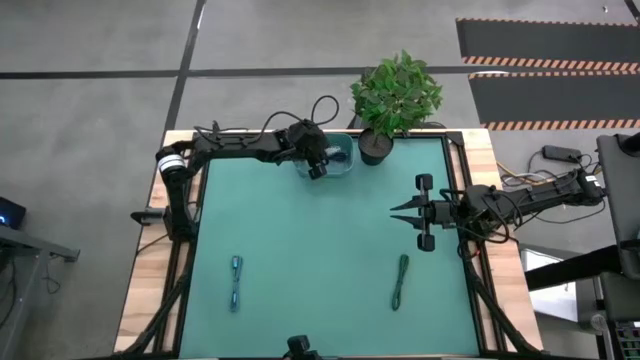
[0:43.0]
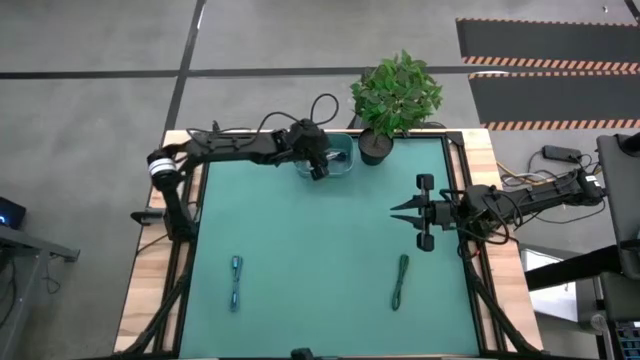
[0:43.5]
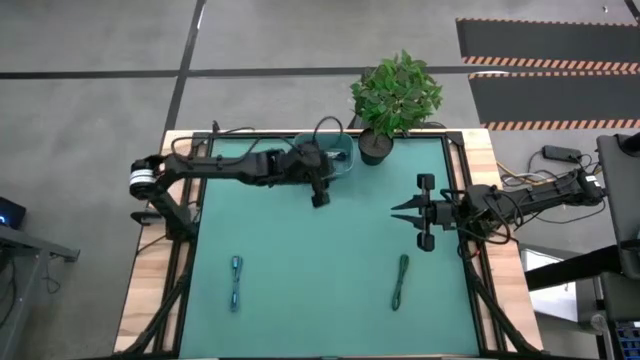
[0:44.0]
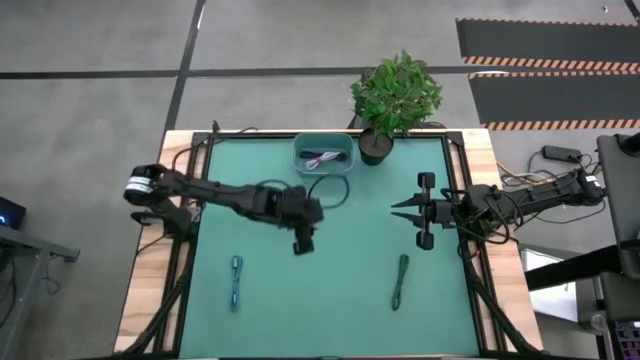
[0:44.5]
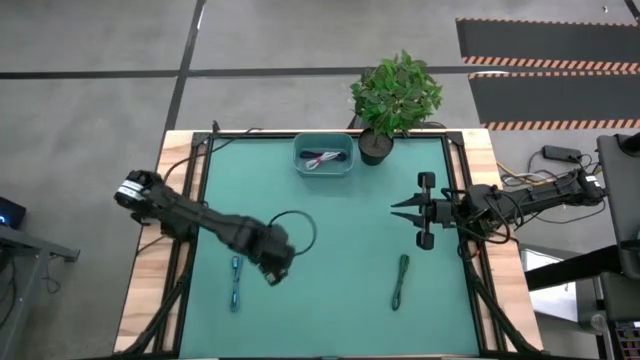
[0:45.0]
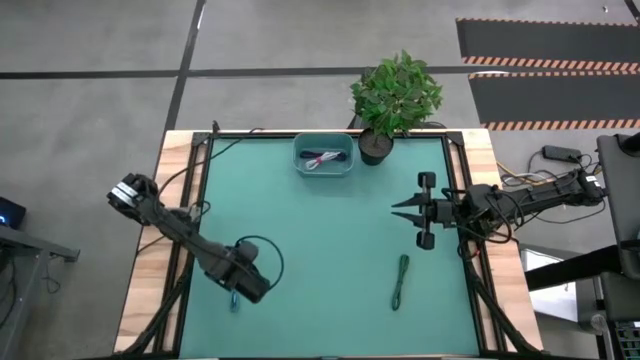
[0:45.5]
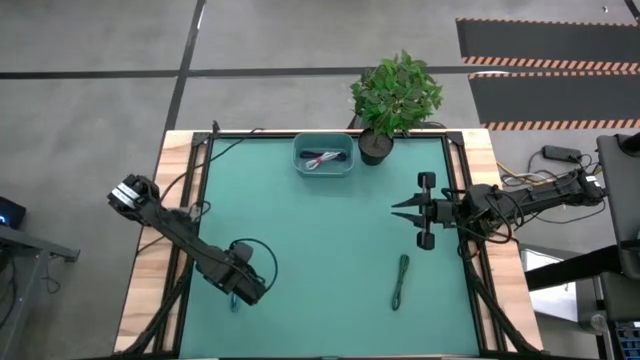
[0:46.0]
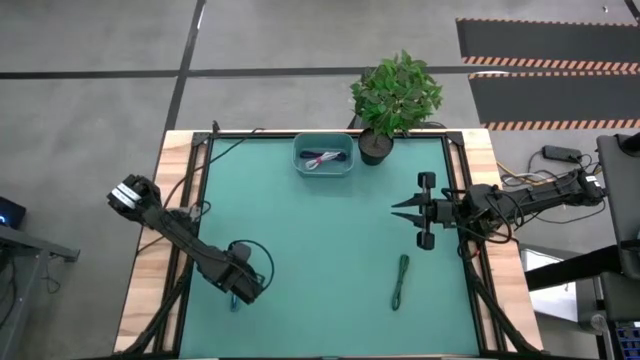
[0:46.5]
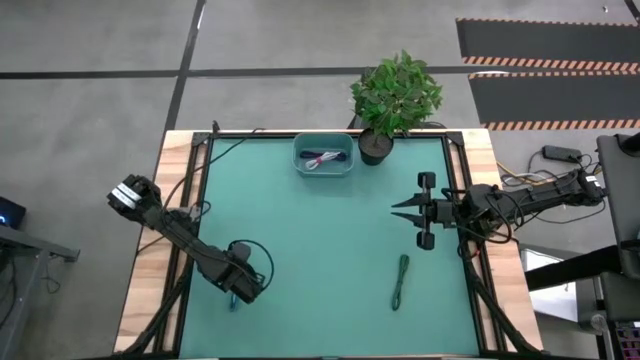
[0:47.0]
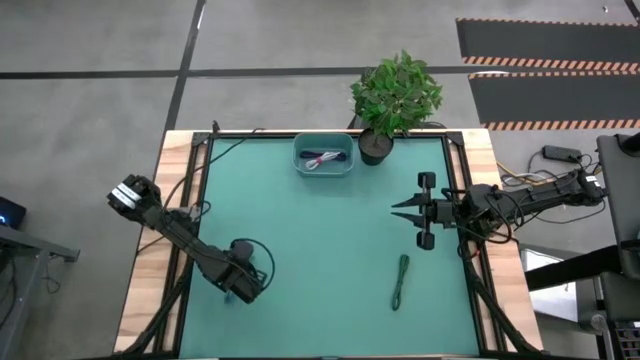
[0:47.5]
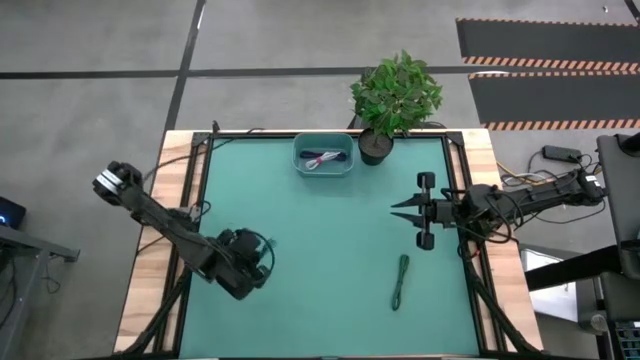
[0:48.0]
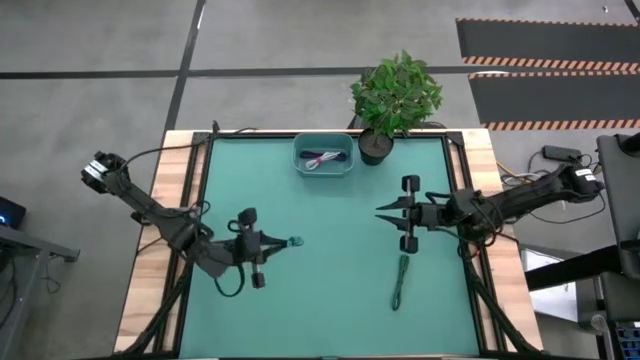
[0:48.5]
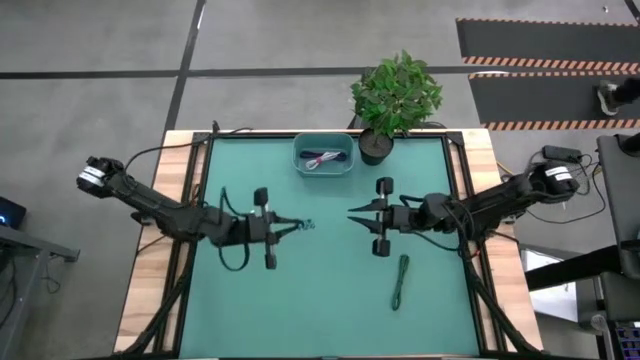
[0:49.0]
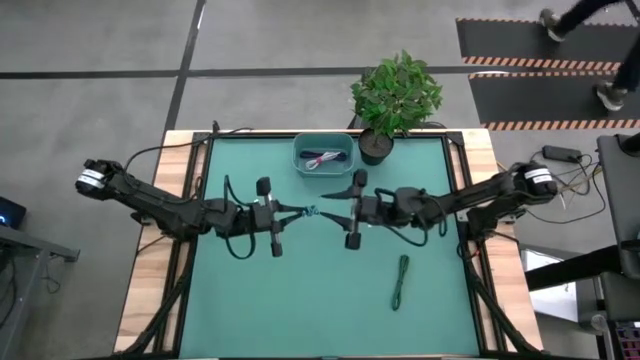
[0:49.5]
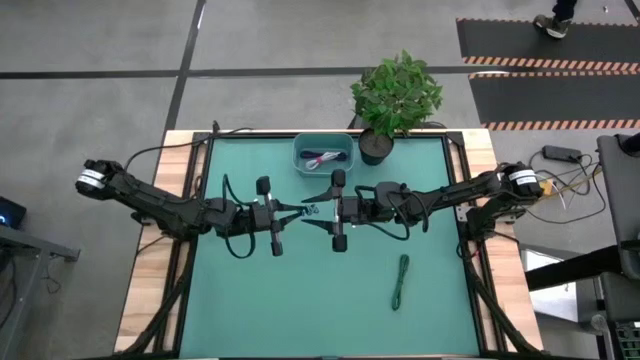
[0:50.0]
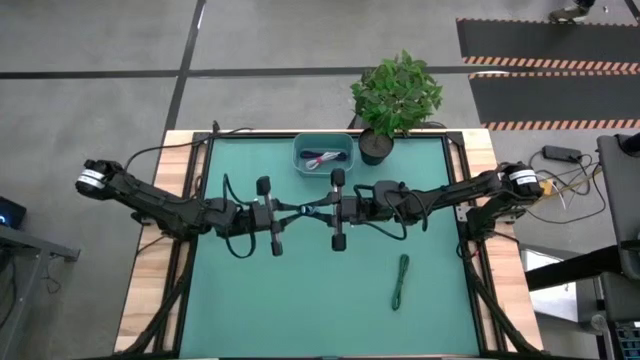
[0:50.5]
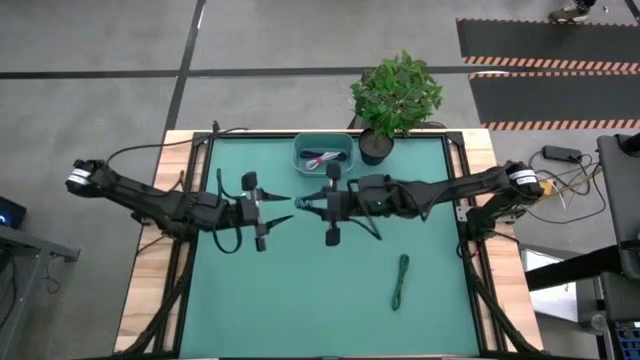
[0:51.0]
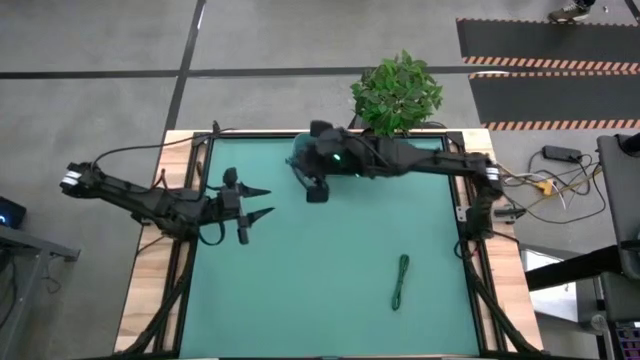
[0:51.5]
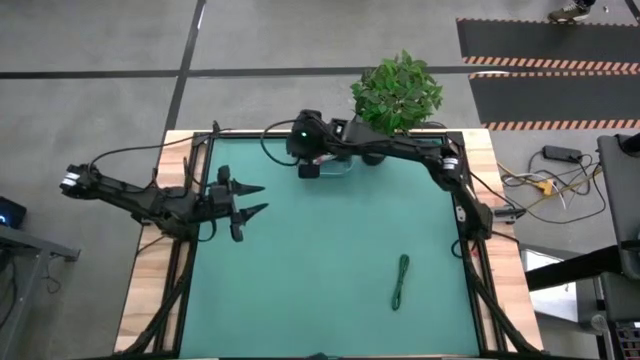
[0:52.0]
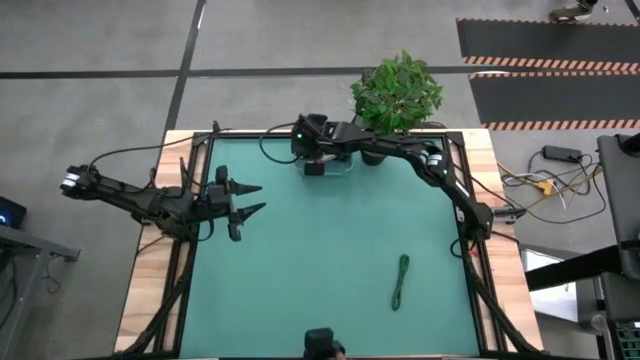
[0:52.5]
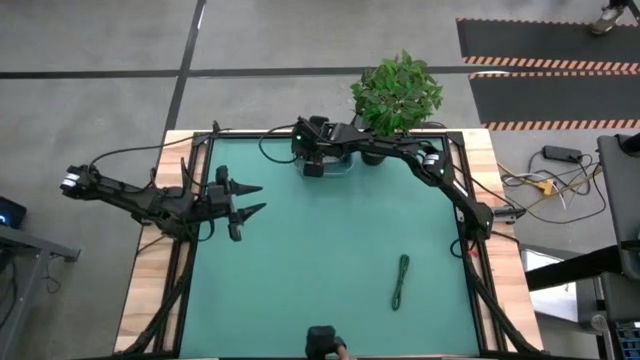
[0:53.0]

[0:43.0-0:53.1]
Task: Pick and place USB-C Cables
Put the blue charger cable into the green bin

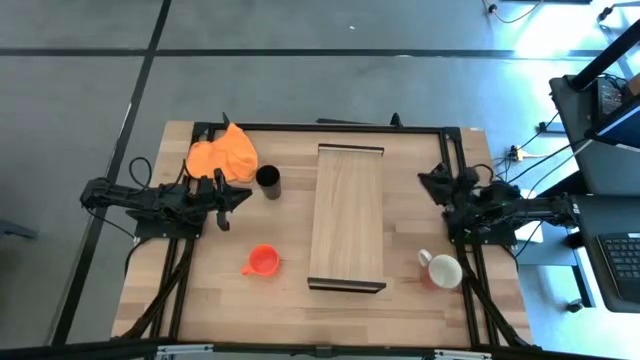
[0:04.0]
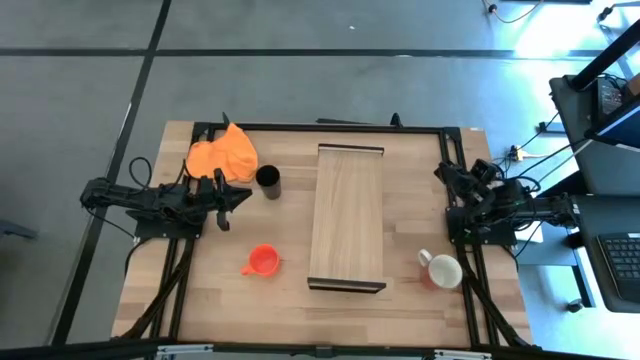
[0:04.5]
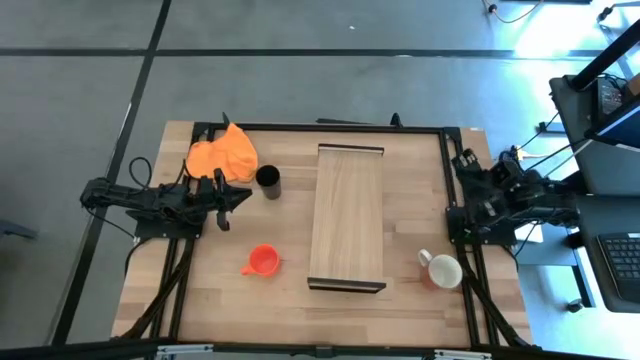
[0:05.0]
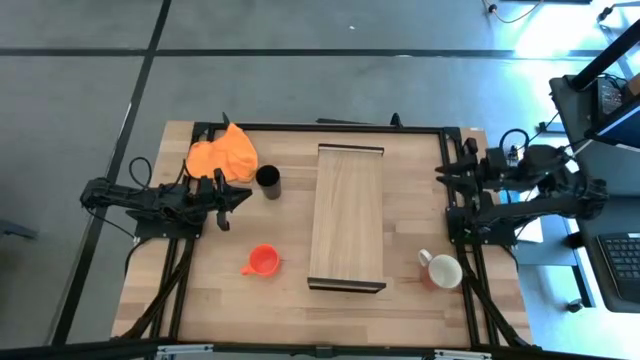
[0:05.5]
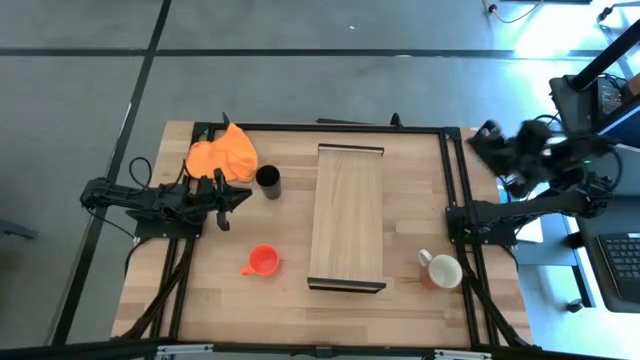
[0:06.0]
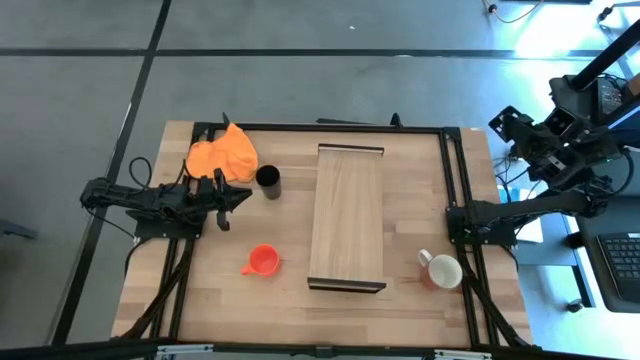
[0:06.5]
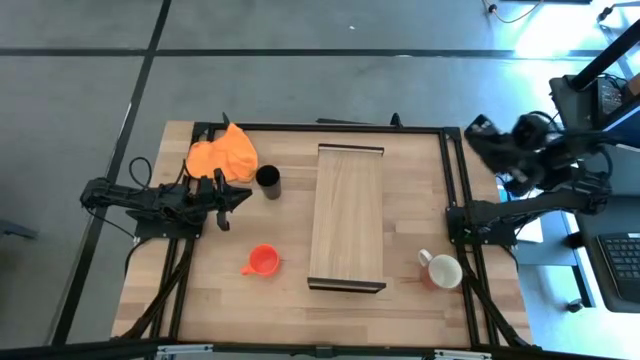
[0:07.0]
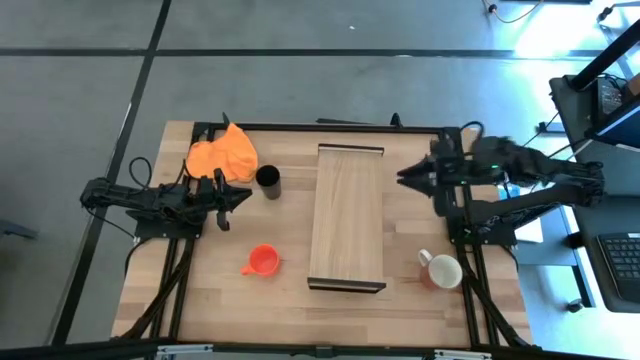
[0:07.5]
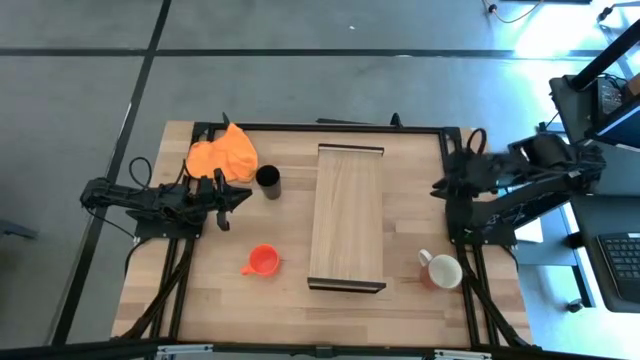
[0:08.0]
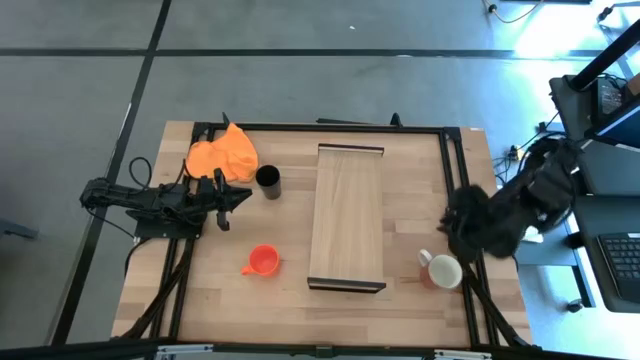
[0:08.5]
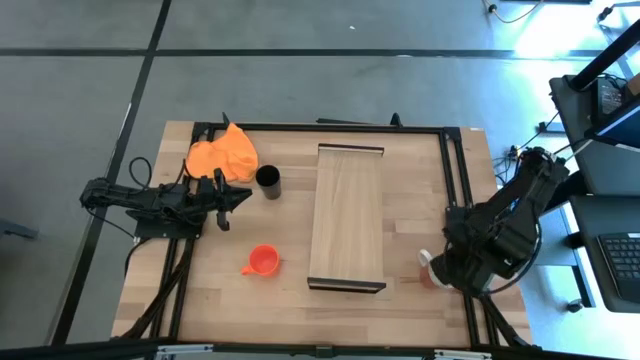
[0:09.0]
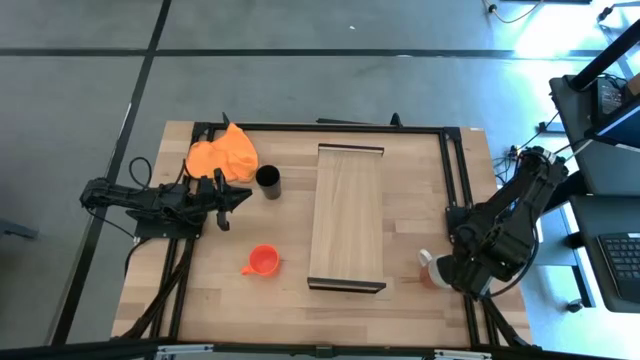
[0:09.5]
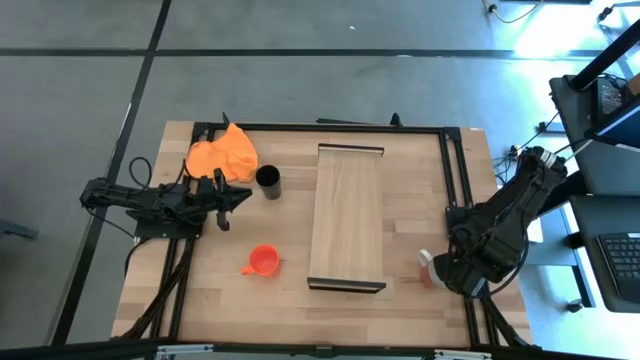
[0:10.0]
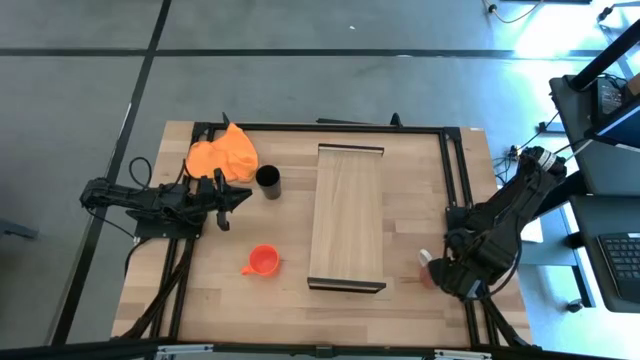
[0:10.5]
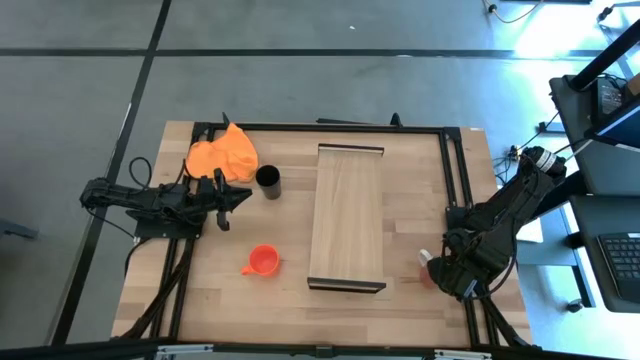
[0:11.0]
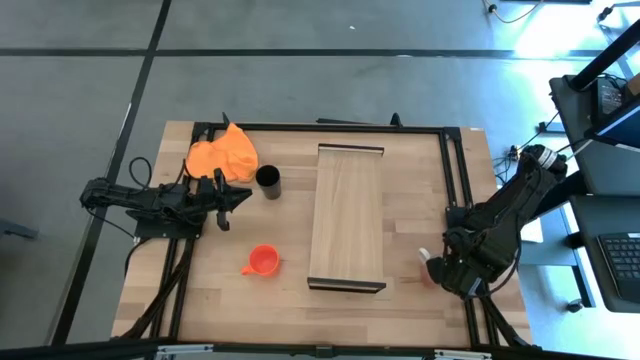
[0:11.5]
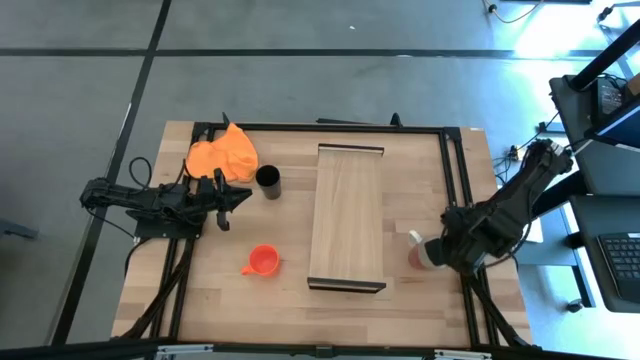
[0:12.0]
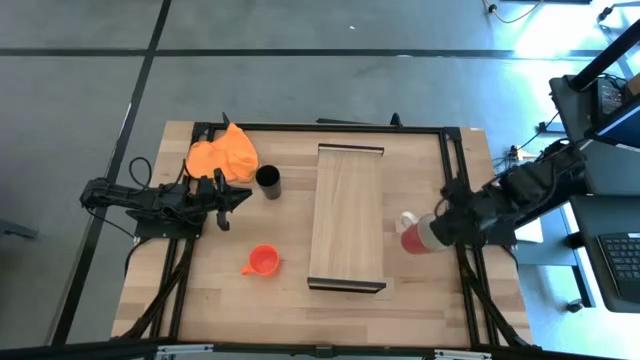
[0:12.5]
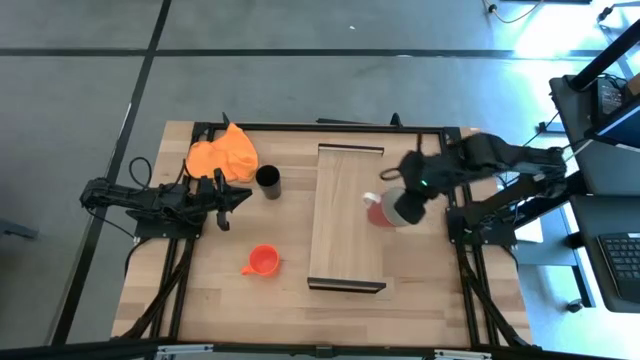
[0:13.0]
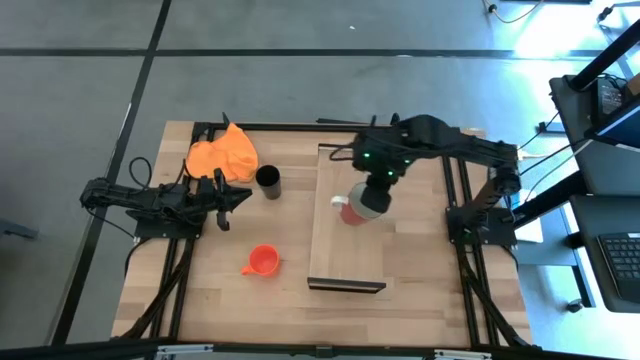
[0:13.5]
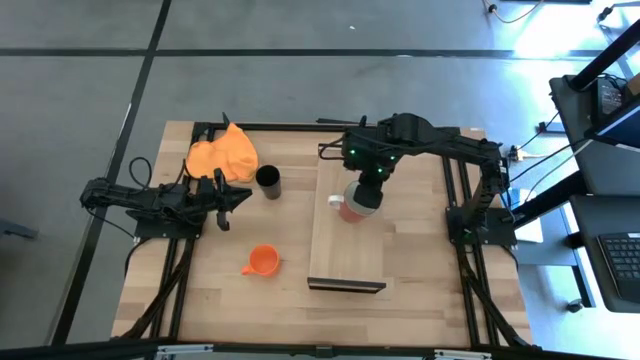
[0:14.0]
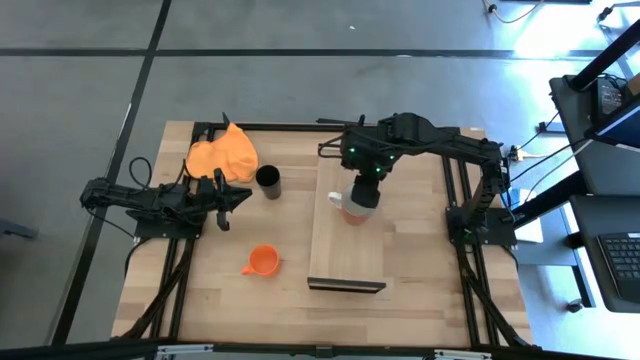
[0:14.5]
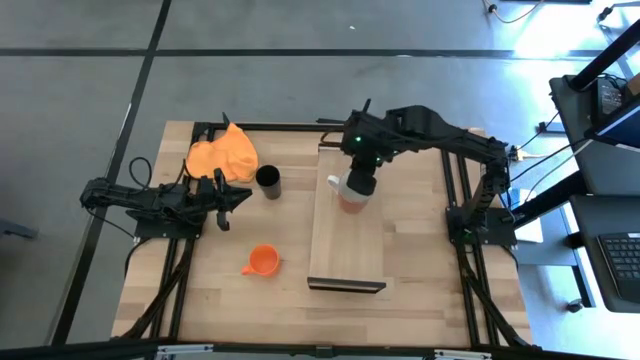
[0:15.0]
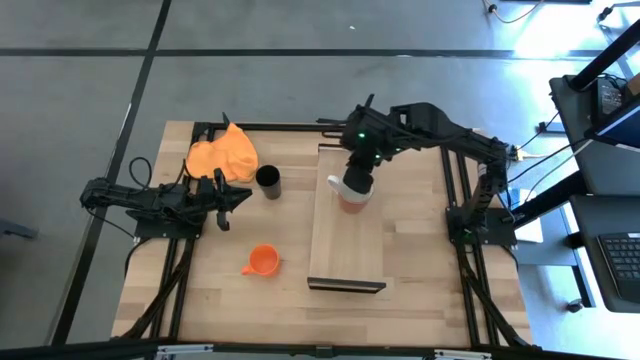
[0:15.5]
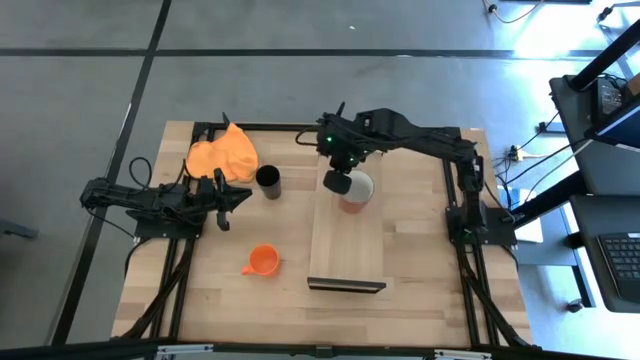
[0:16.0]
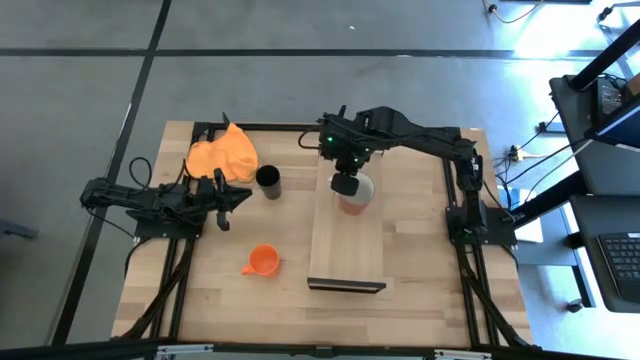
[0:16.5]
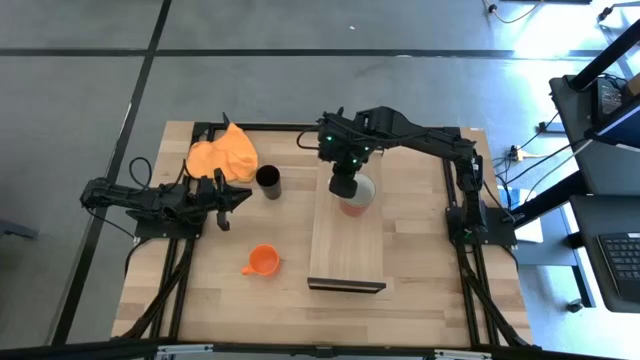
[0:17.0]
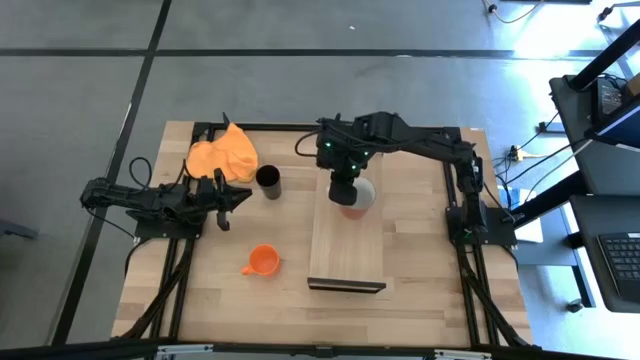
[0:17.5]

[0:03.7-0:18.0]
Task: Stack small to large cups/mugs on shelf
Put the red mug on the shelf
